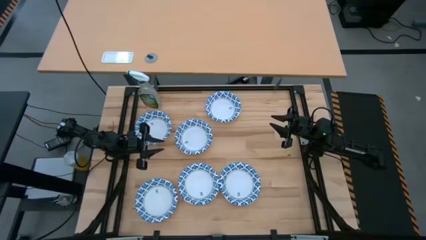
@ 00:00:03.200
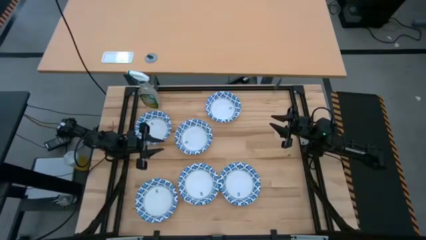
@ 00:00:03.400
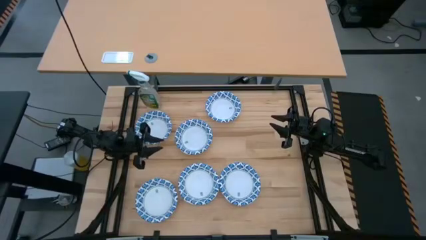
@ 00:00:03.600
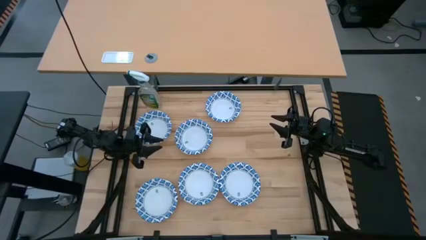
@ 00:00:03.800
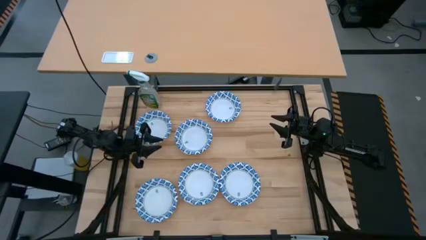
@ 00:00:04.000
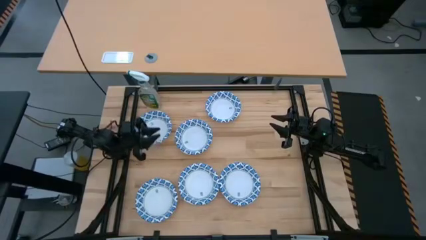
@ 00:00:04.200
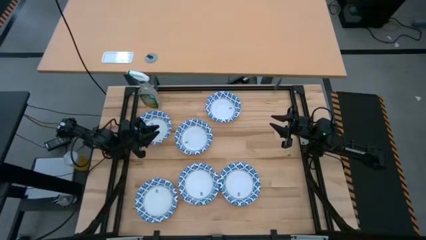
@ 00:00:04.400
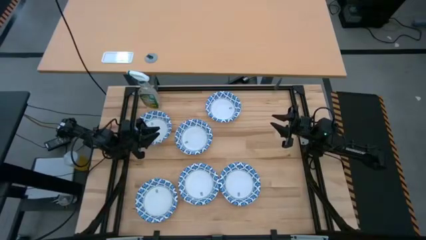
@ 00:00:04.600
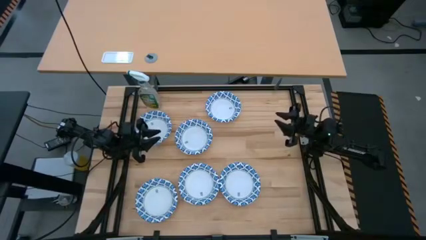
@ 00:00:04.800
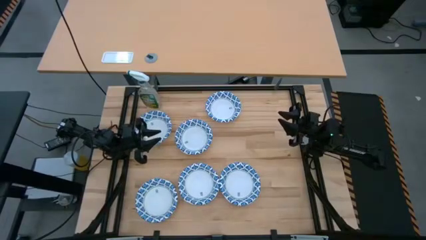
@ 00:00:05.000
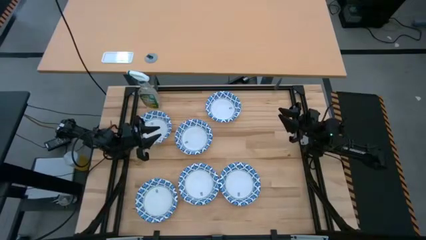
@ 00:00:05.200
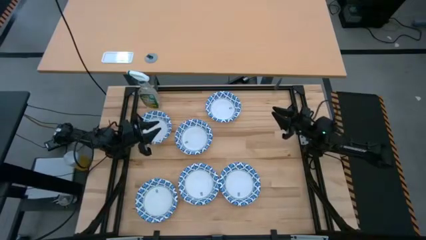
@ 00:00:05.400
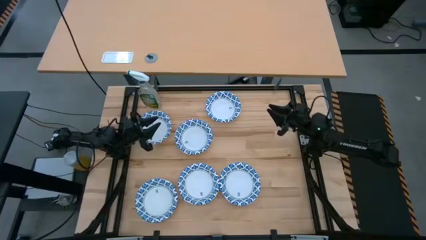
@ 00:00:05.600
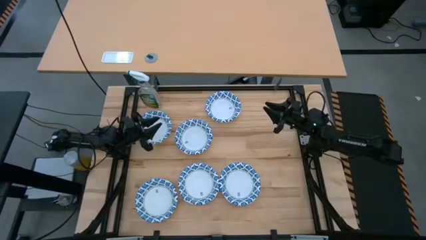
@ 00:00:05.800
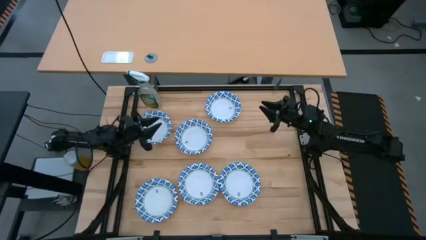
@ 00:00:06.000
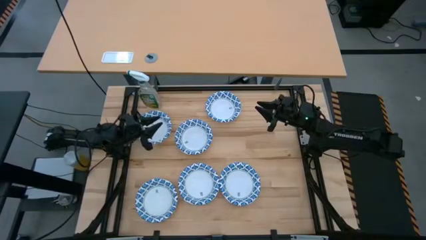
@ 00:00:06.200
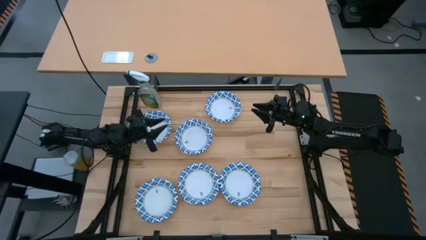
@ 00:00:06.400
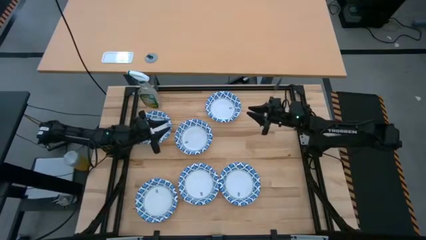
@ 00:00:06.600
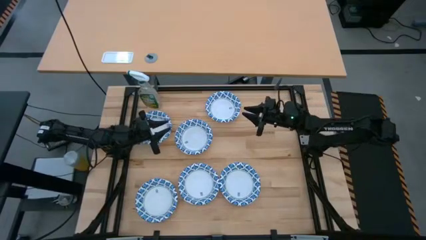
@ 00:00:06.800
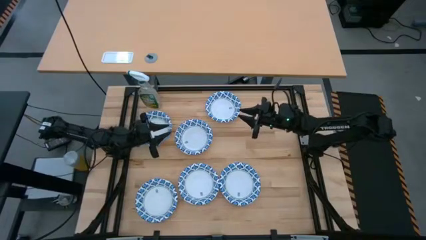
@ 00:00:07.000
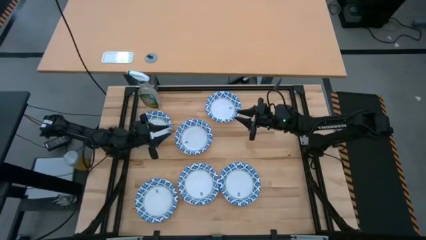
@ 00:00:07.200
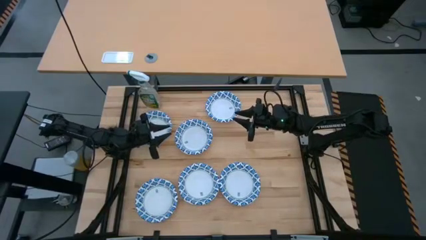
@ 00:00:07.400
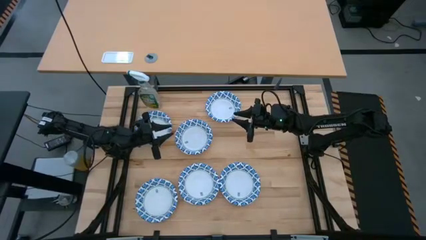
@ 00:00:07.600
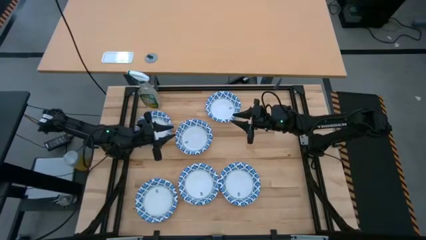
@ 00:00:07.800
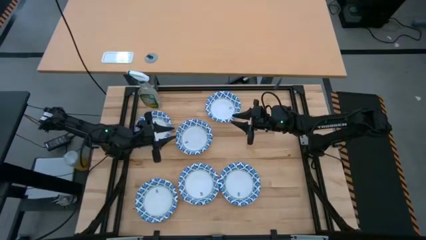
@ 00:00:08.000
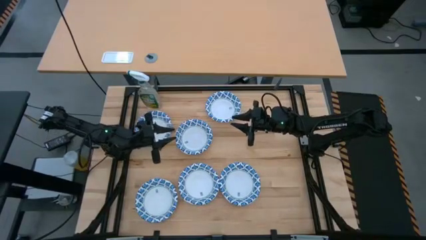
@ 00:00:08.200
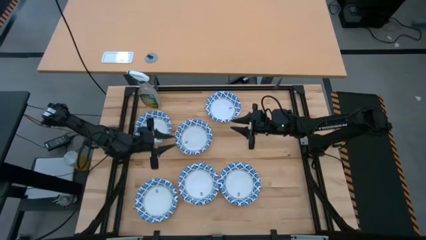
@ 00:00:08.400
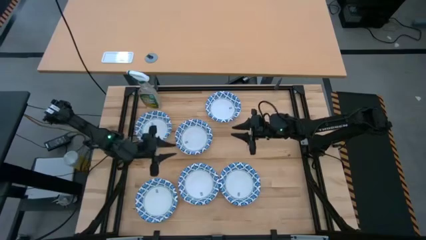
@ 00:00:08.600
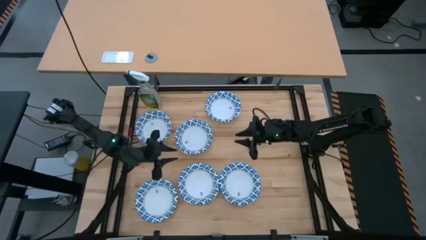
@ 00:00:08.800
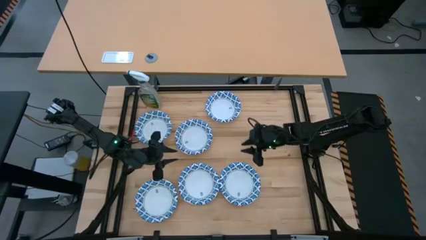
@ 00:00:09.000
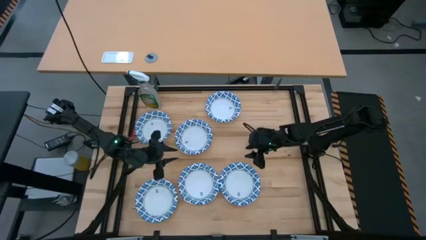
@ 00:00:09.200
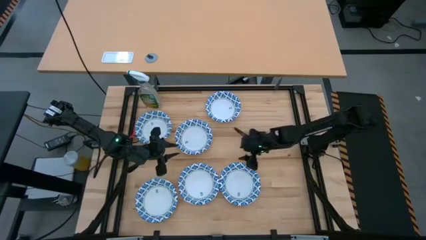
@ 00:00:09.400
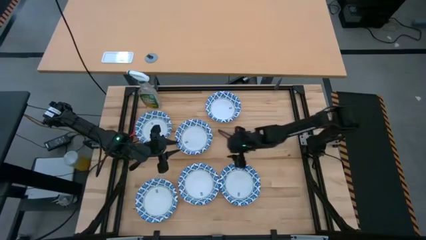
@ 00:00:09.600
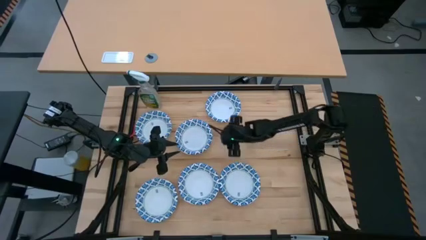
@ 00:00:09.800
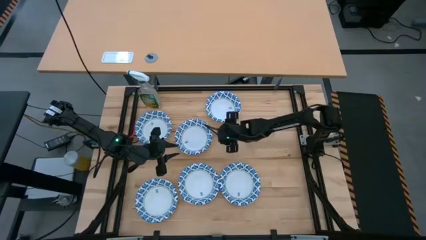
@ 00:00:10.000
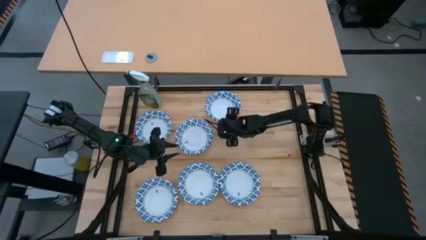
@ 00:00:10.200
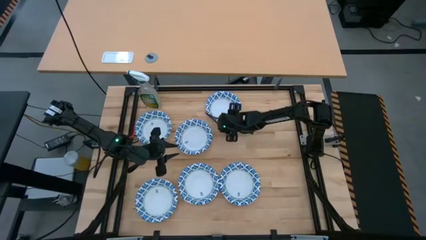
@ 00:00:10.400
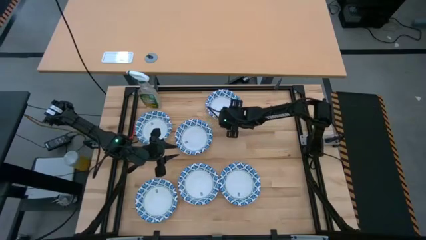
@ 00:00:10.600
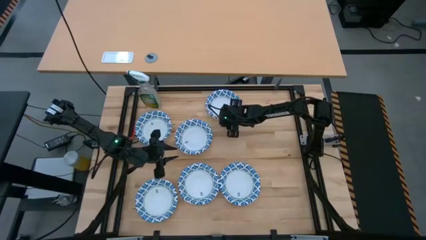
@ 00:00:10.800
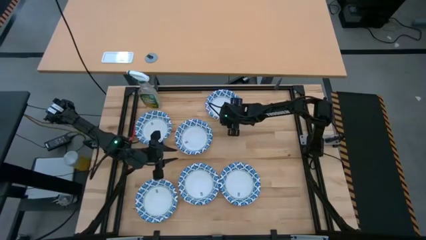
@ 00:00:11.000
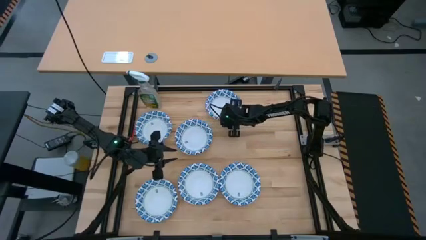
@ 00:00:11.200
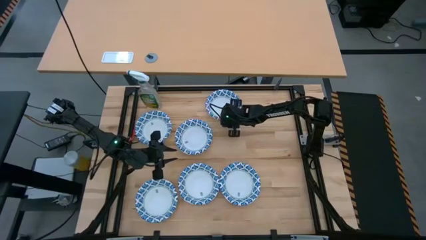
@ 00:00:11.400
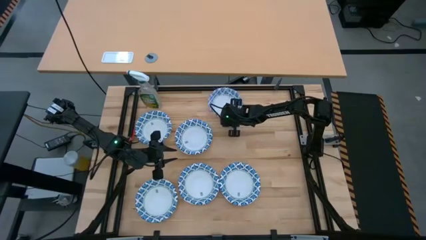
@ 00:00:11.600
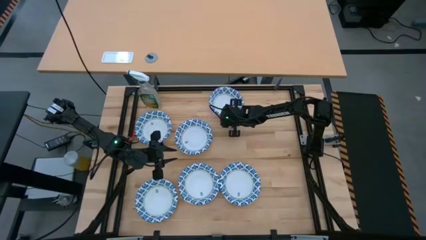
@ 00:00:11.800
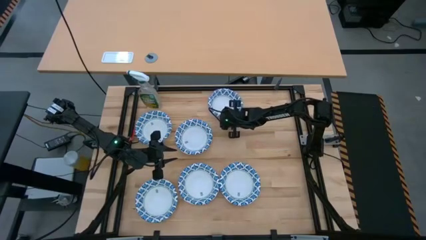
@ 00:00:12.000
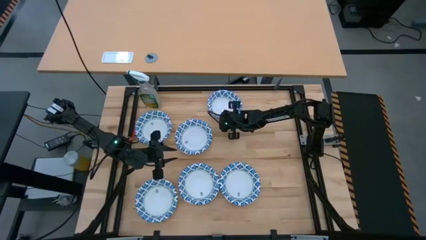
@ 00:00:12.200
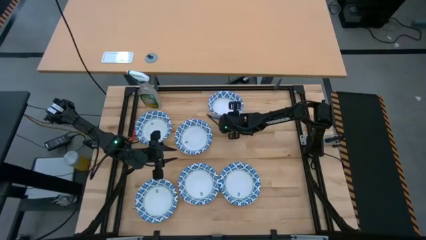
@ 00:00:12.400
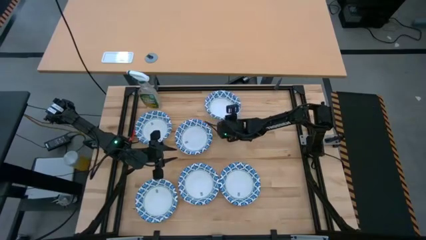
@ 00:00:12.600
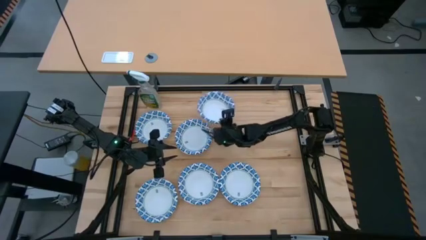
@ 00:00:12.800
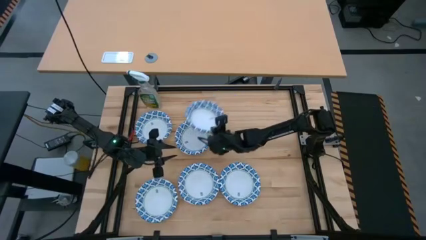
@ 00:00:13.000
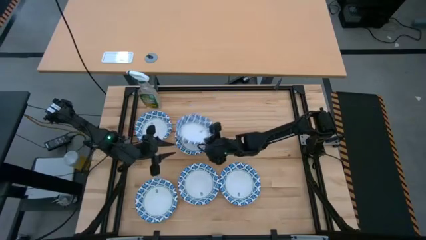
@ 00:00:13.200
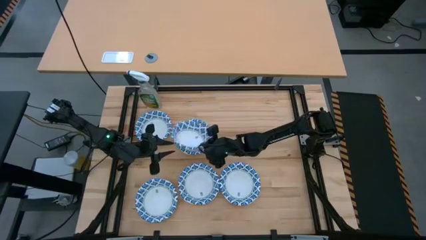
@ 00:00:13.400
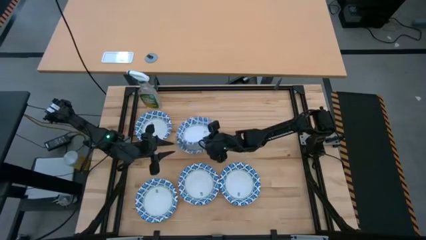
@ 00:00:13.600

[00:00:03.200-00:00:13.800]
Stack the white bowl on top of the white bowl

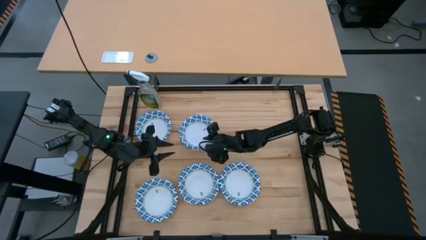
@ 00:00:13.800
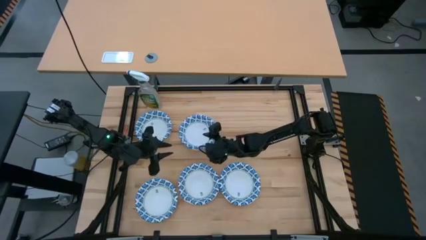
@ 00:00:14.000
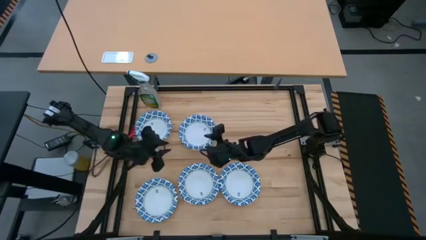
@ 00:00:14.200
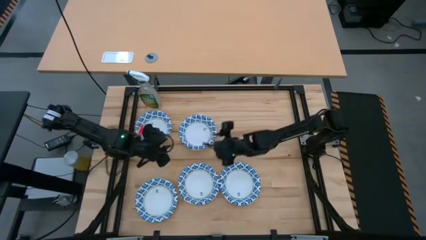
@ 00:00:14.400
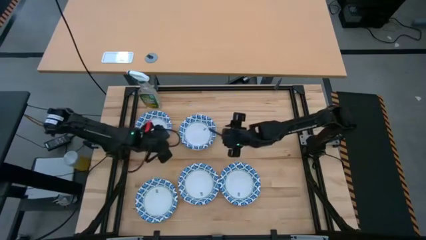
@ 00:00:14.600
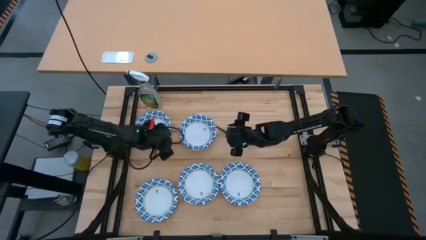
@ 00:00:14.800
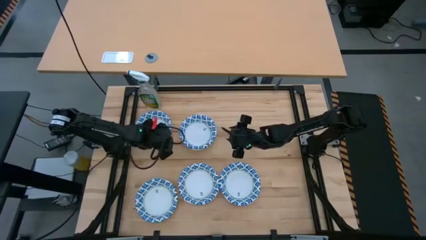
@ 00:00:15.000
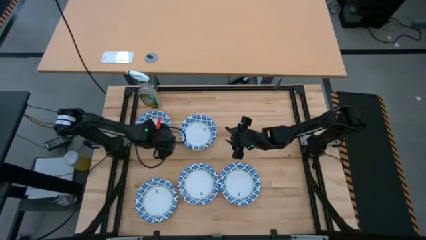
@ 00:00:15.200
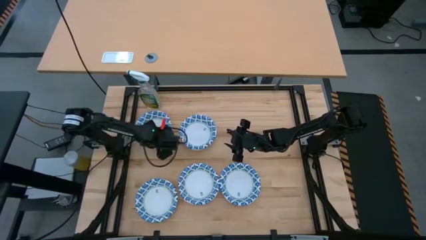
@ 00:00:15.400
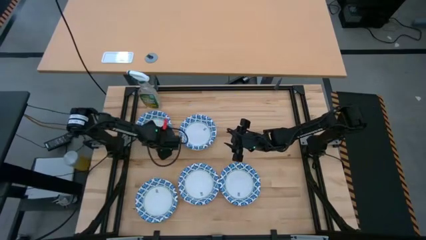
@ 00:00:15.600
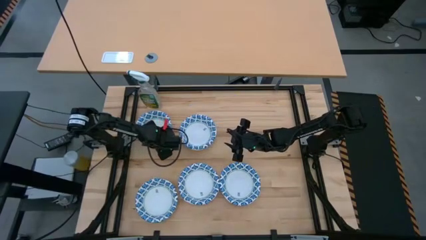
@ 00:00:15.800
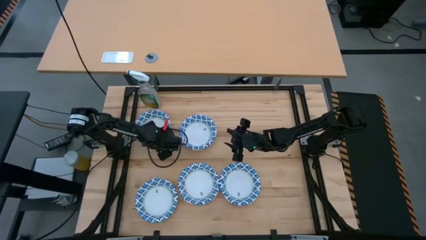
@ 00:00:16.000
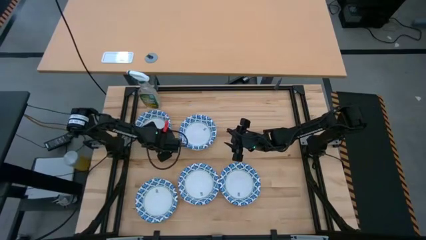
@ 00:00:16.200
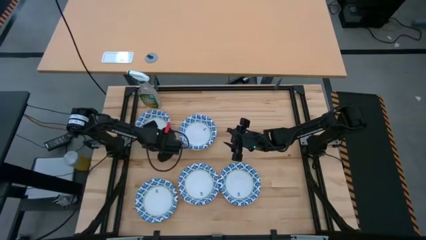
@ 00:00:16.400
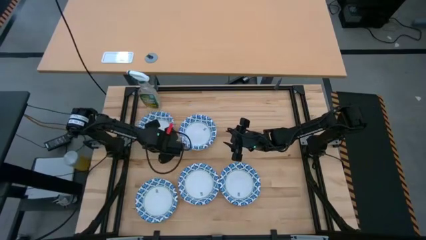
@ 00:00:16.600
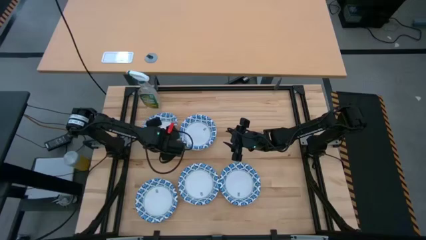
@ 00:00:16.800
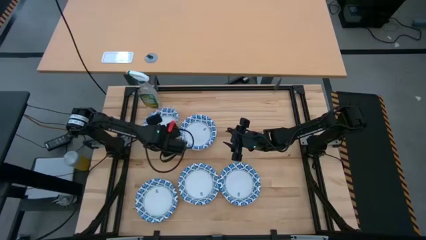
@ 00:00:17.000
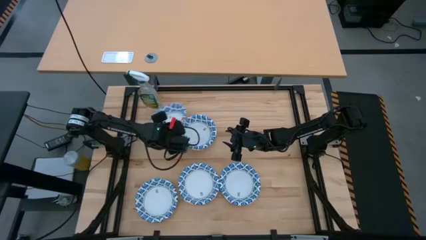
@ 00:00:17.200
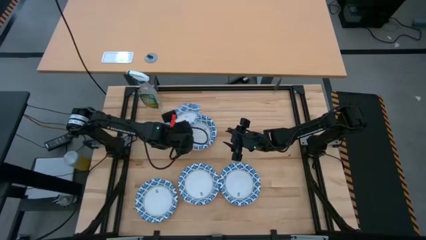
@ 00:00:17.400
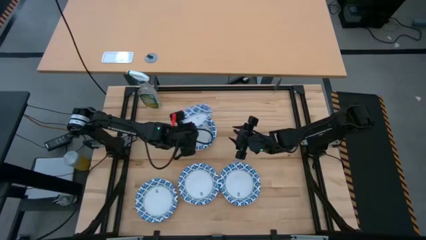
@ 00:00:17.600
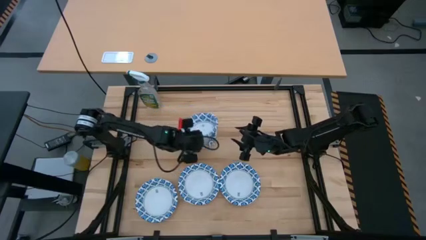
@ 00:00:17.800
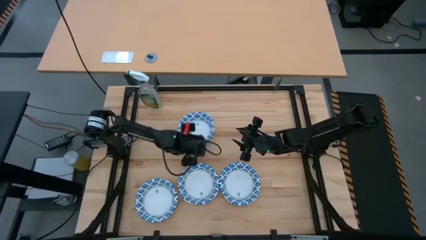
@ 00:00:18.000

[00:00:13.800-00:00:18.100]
Stack the white bowl on top of the stacked white bowls
